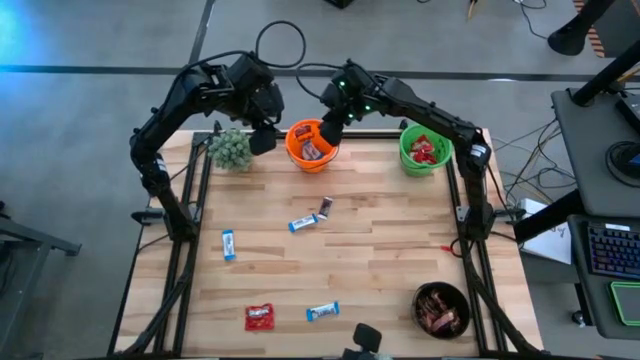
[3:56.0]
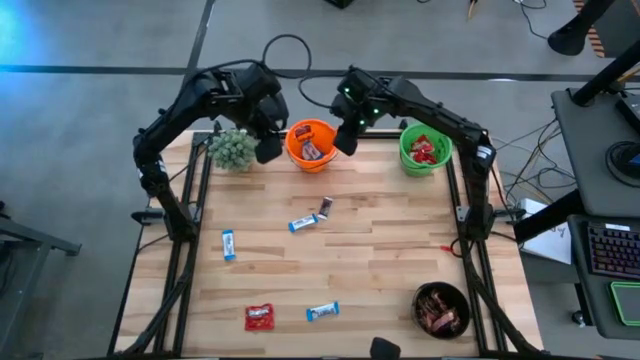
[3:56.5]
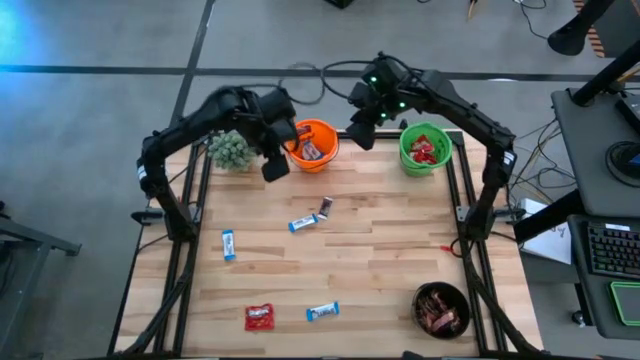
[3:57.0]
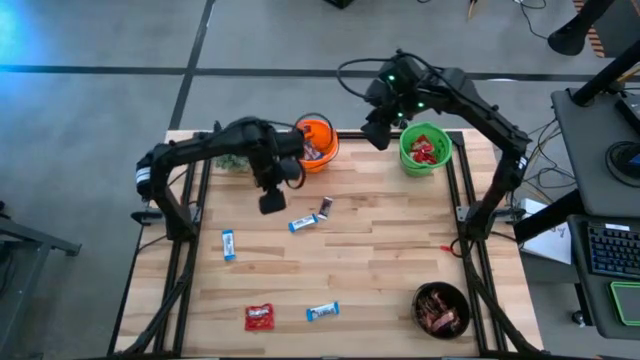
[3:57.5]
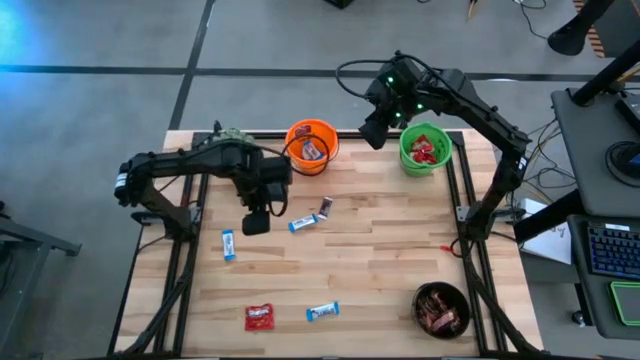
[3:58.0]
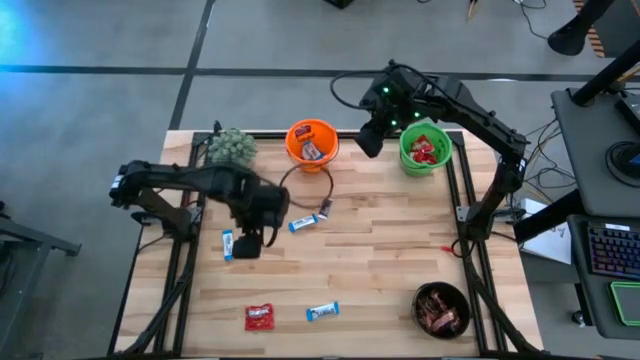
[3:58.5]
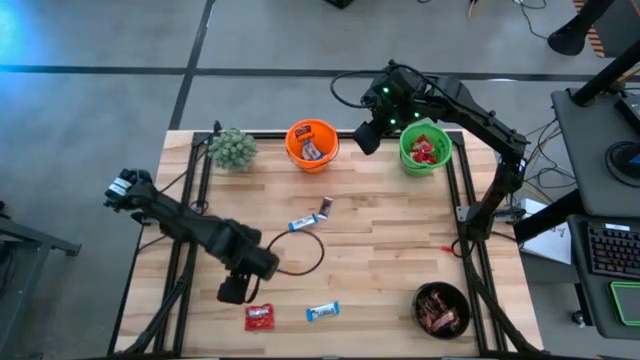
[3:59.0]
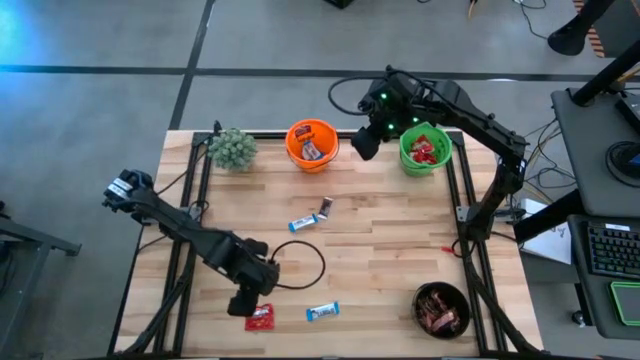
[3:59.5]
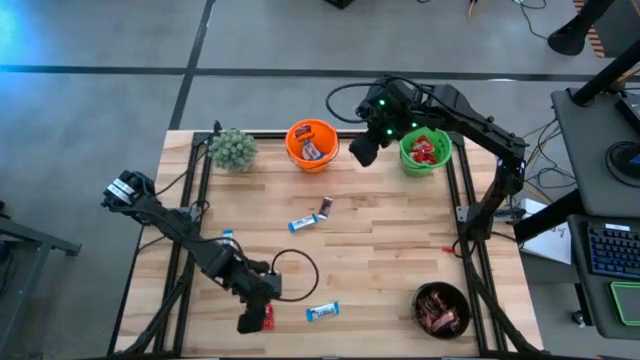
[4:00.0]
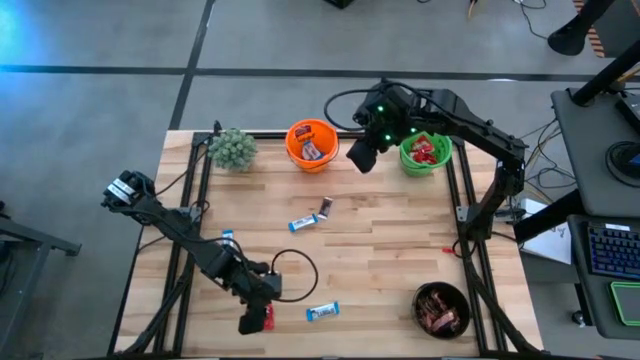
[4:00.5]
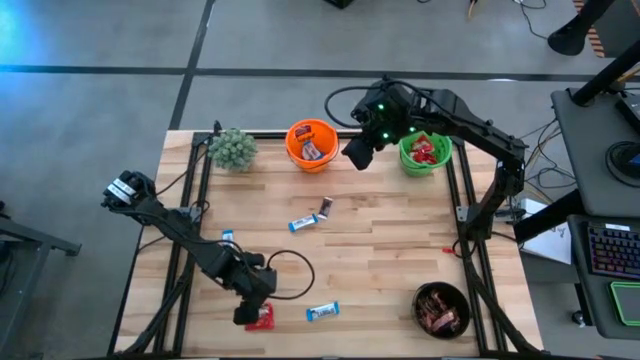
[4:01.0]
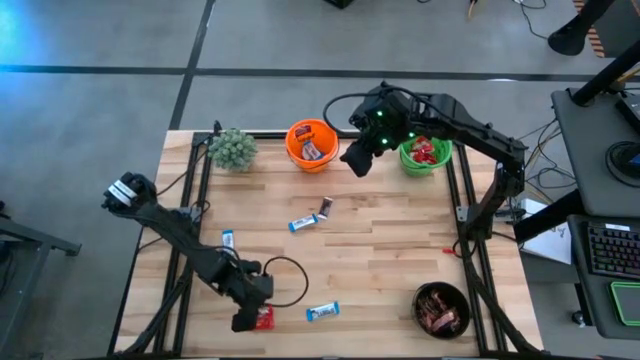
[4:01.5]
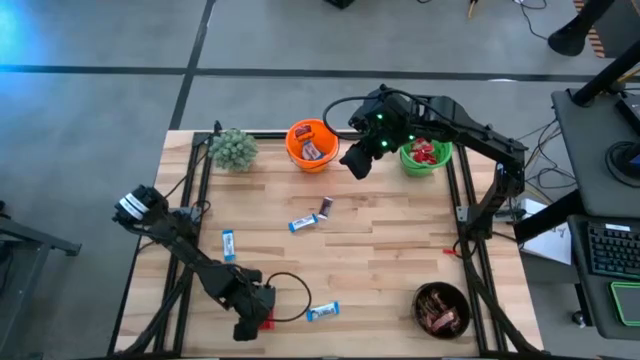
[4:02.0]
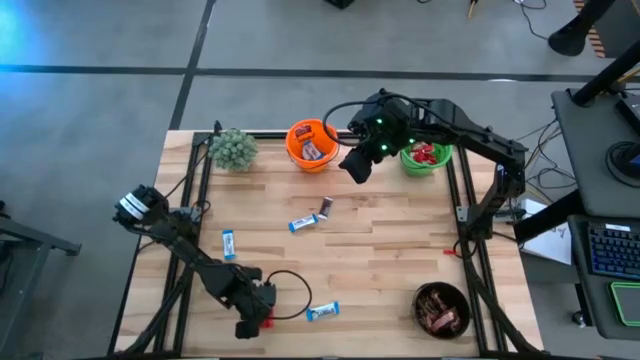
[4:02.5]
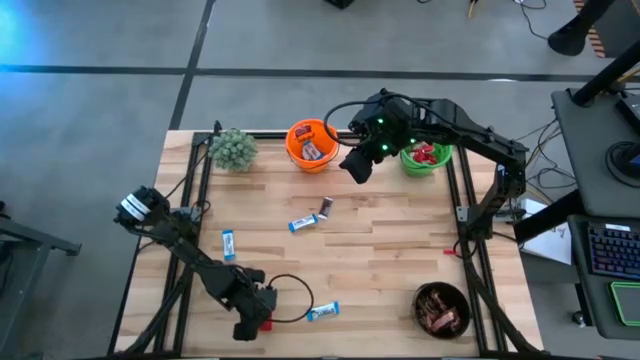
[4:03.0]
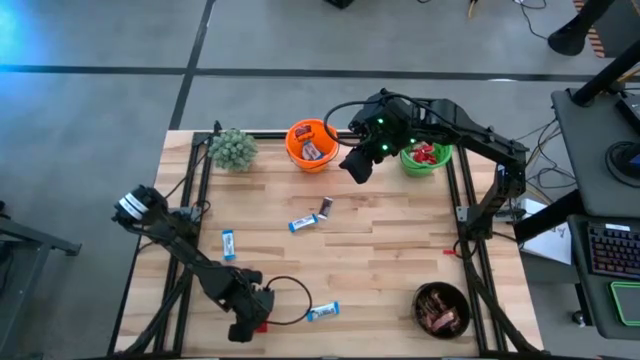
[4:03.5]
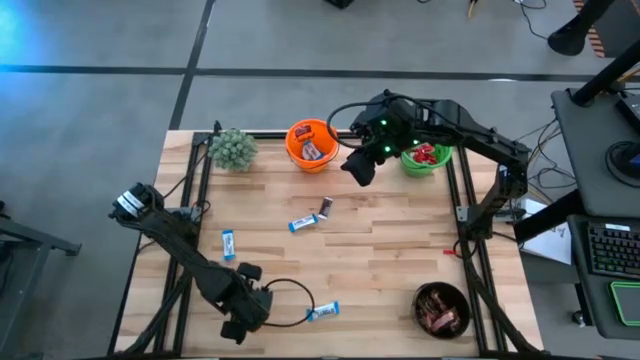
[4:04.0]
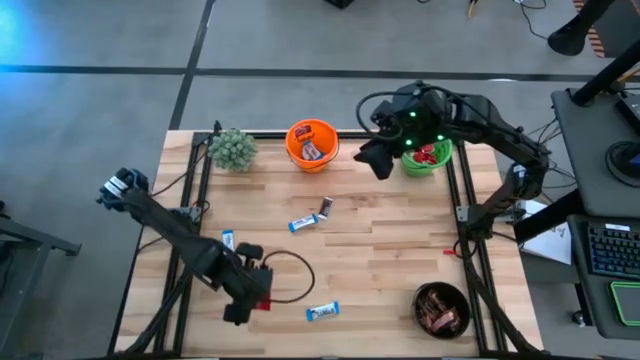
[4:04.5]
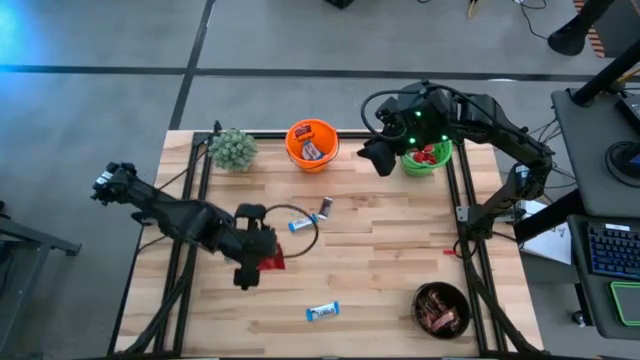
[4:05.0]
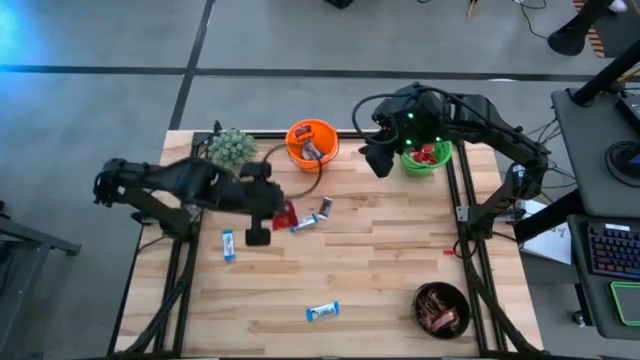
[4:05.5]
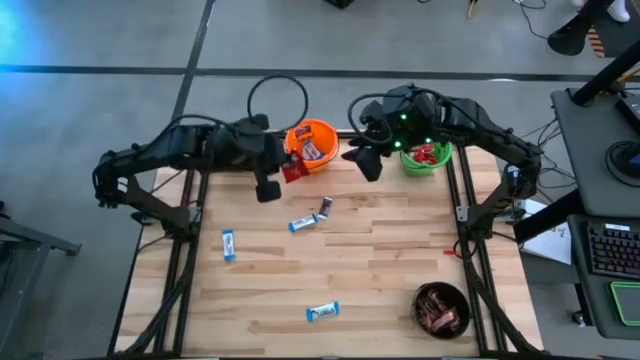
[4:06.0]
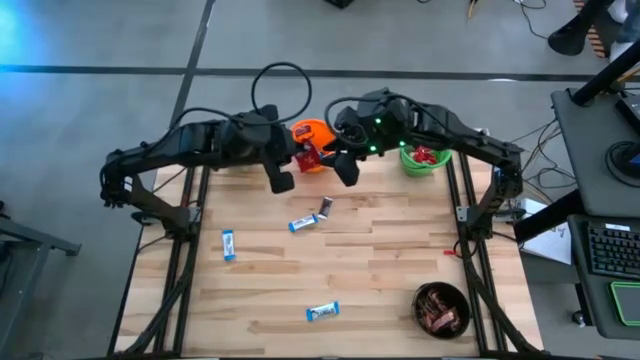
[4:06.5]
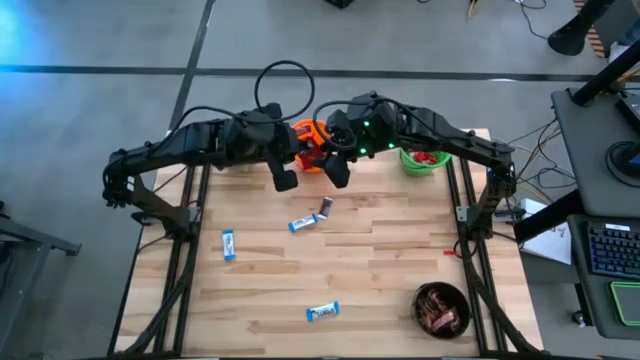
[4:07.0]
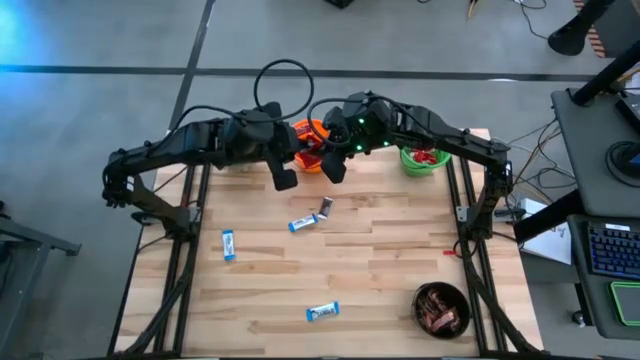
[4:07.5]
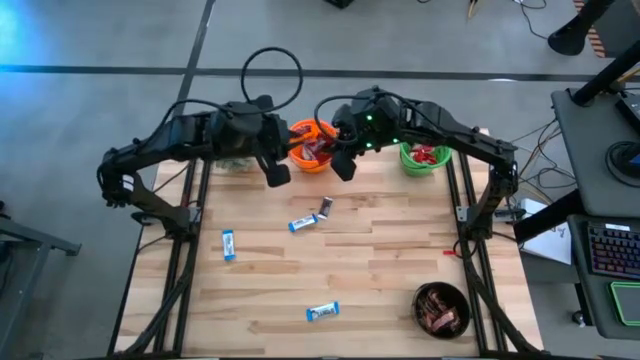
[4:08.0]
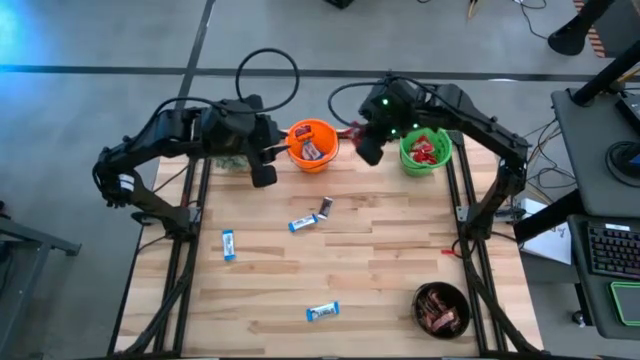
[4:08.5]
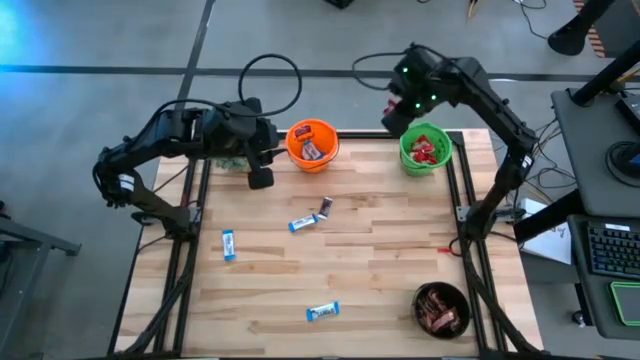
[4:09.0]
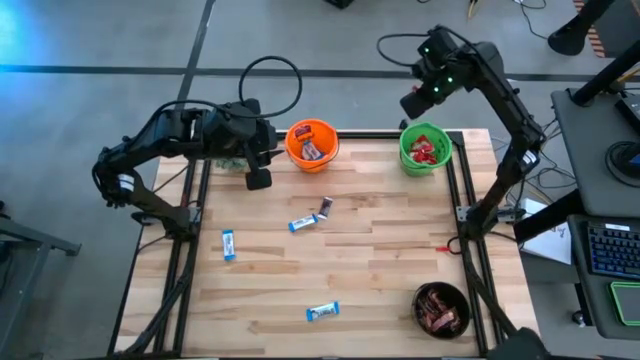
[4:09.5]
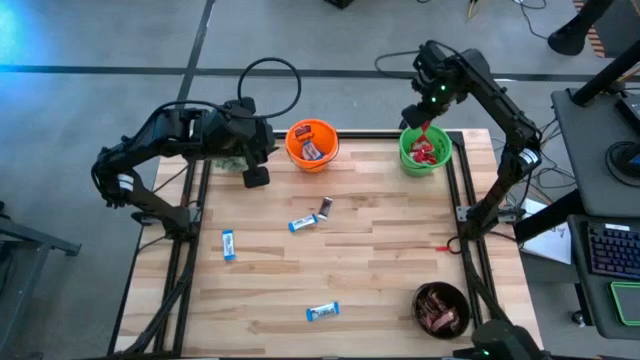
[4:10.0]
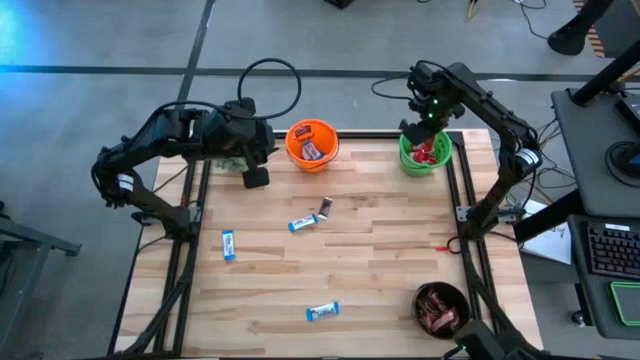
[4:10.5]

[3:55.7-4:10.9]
Task: Sort candy
Put the red candy into the green bucket

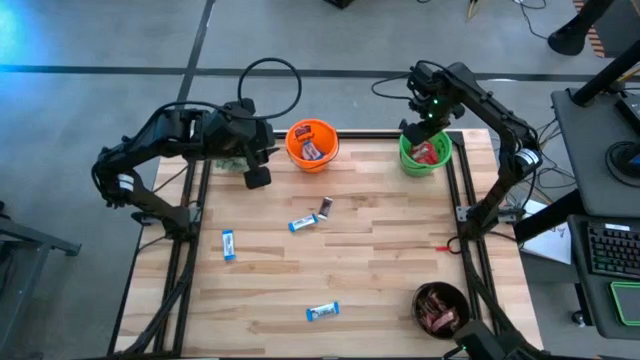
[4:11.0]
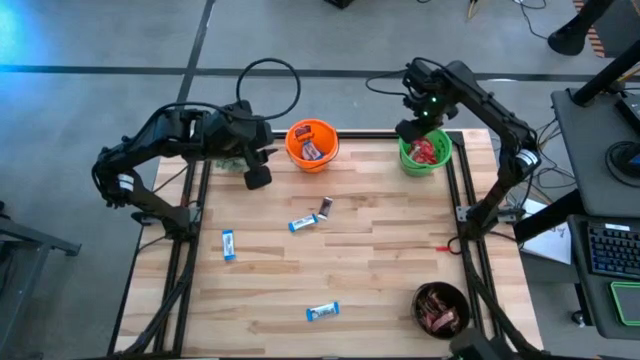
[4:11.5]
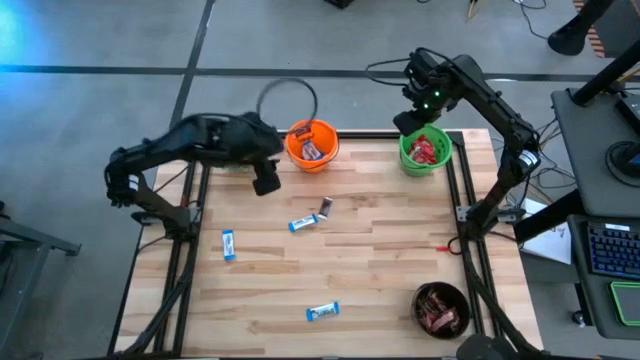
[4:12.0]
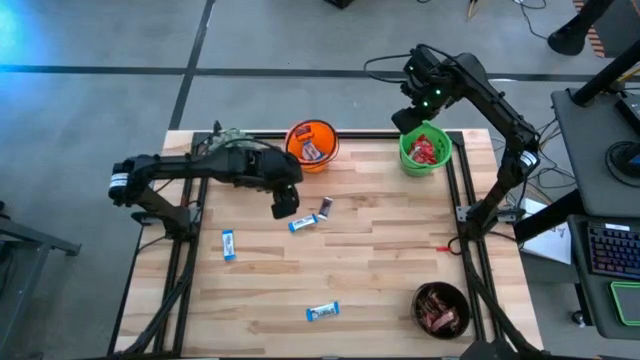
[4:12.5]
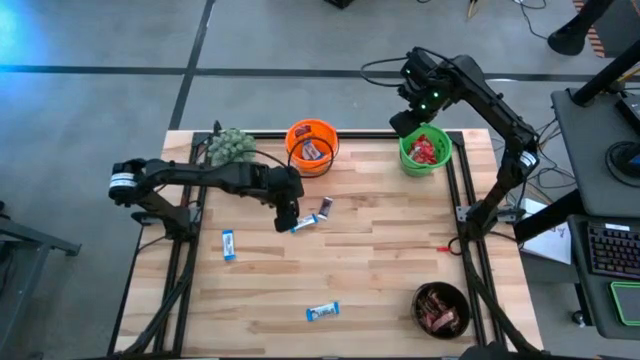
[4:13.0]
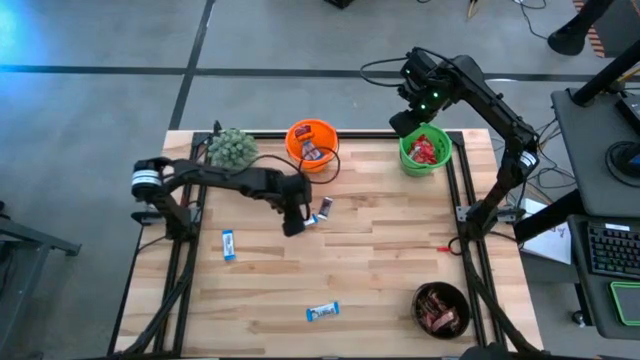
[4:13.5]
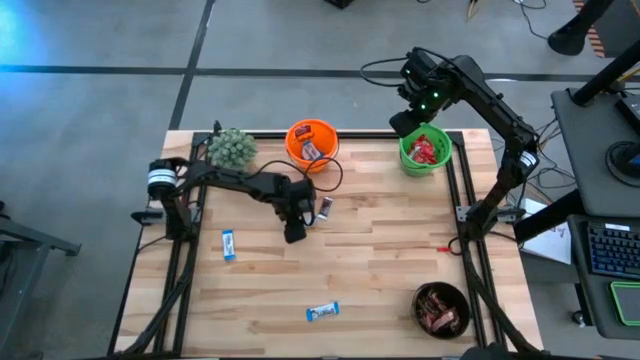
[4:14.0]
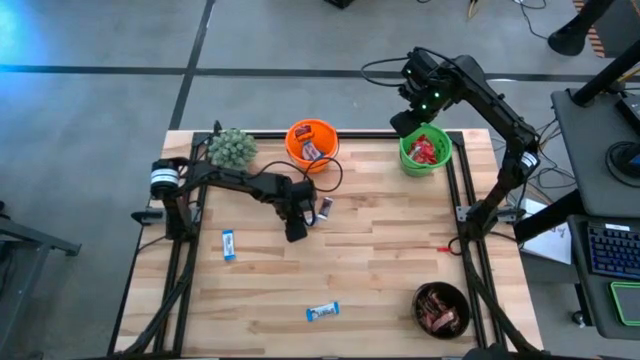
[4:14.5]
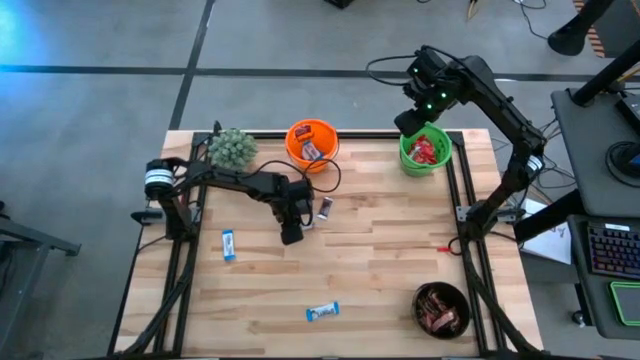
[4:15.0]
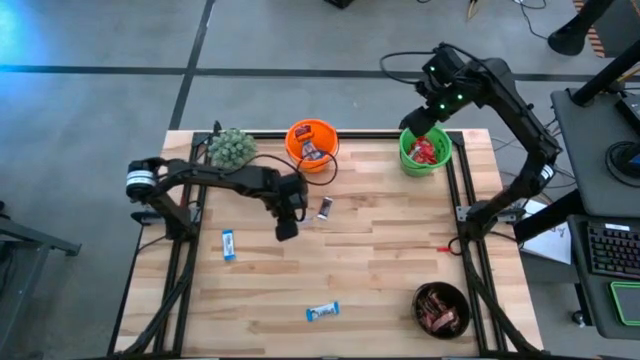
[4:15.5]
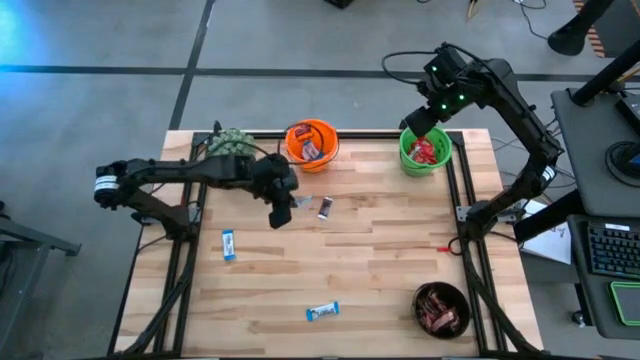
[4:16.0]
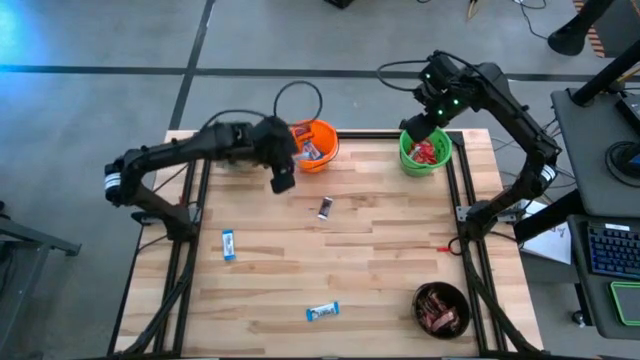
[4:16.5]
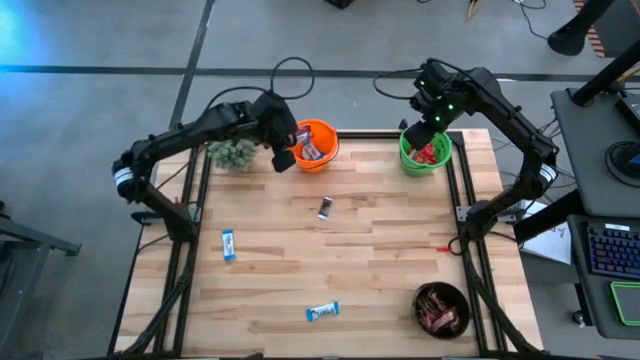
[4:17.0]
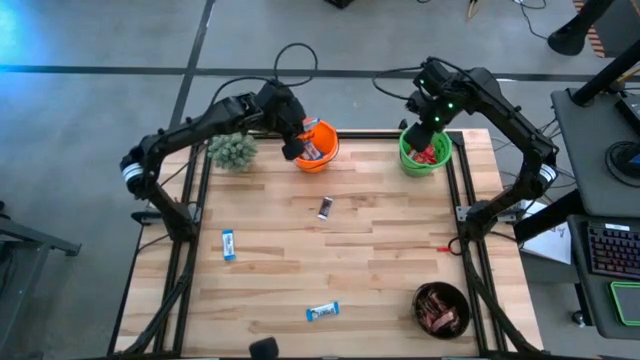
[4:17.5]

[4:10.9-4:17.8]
Put the white chocolate into the orange bucket
